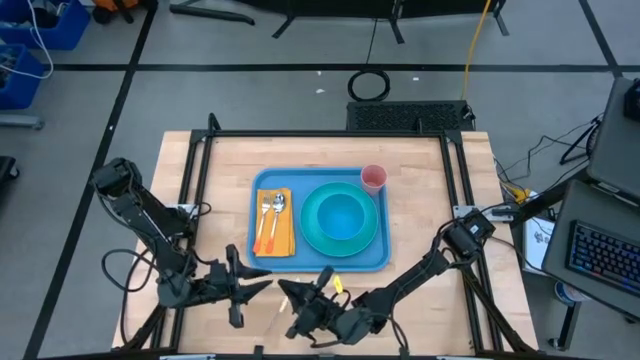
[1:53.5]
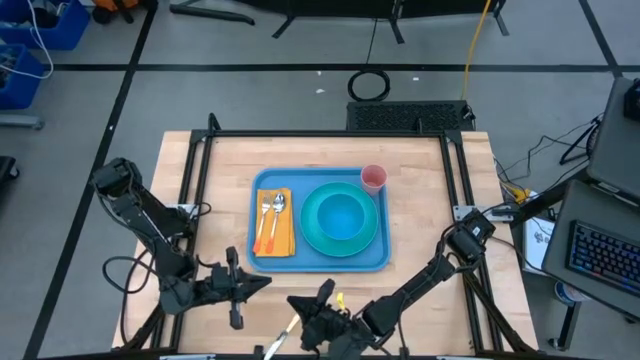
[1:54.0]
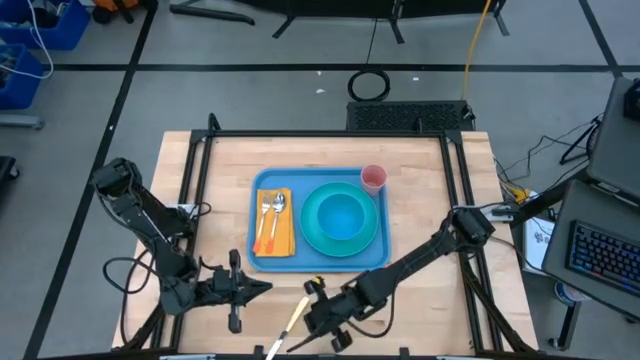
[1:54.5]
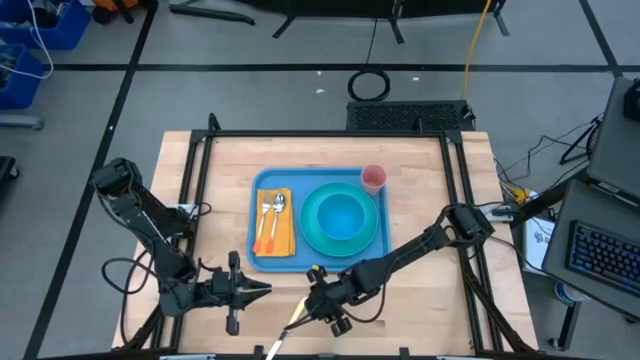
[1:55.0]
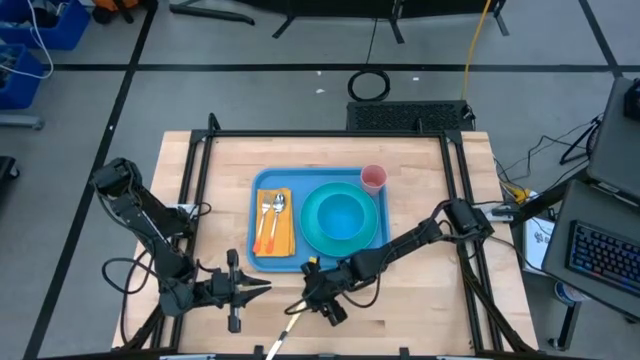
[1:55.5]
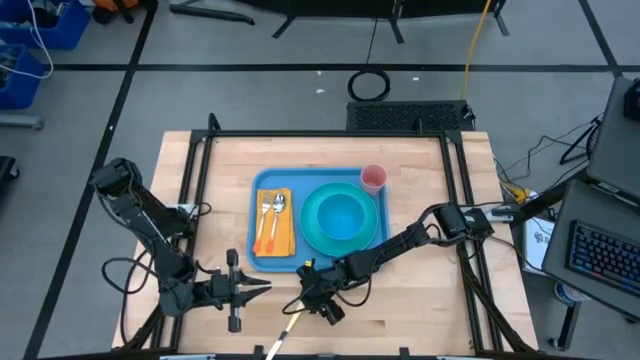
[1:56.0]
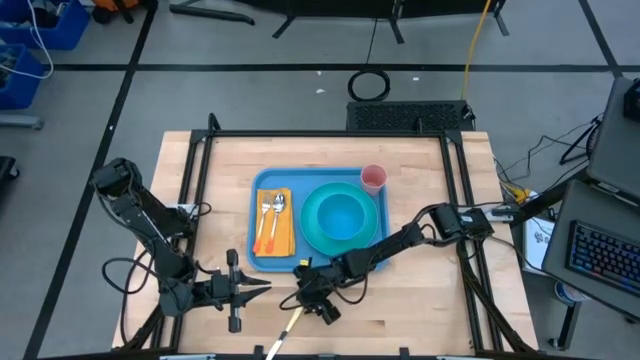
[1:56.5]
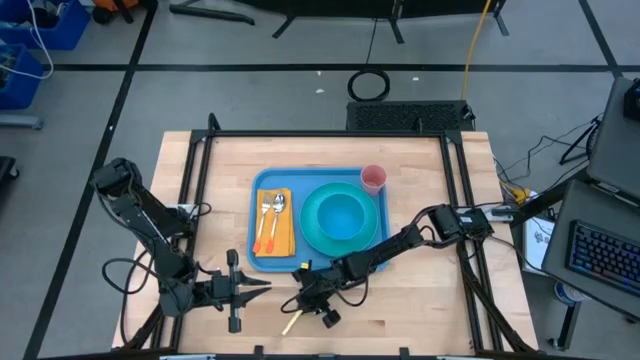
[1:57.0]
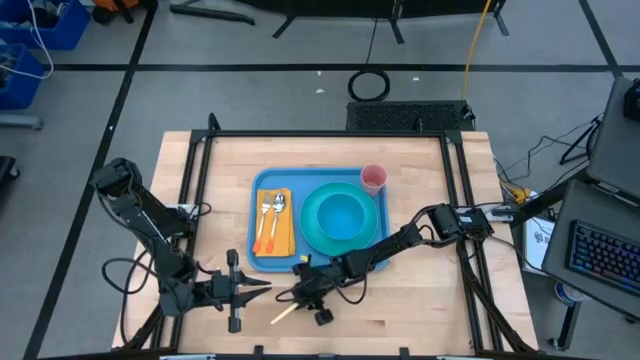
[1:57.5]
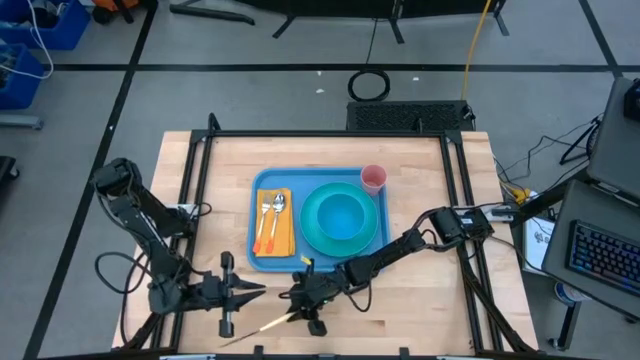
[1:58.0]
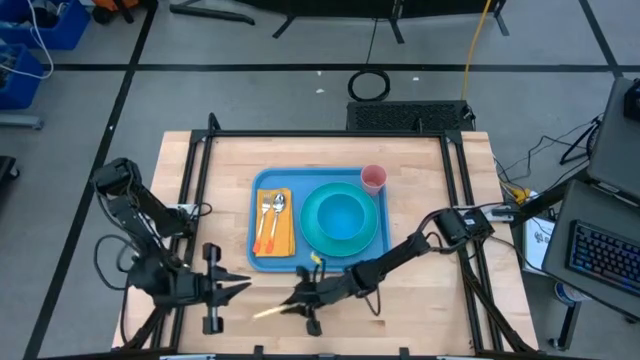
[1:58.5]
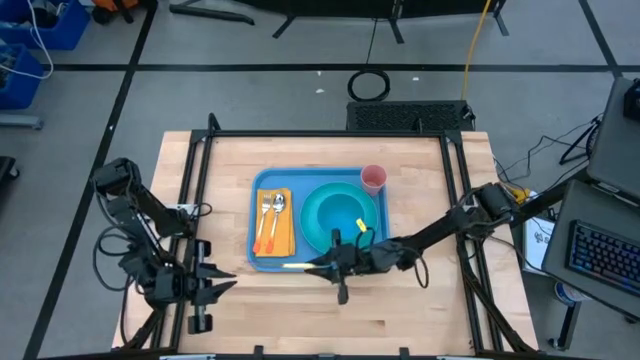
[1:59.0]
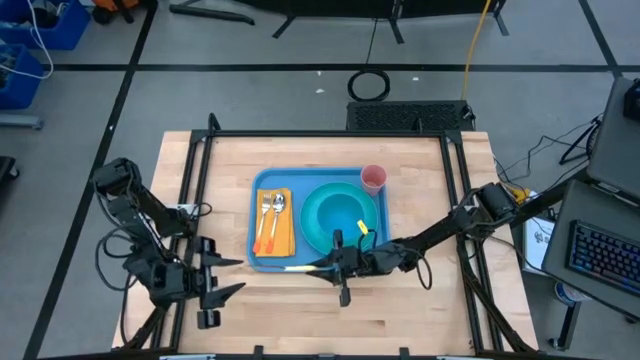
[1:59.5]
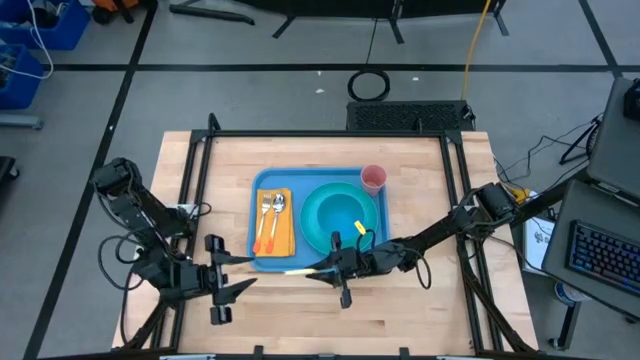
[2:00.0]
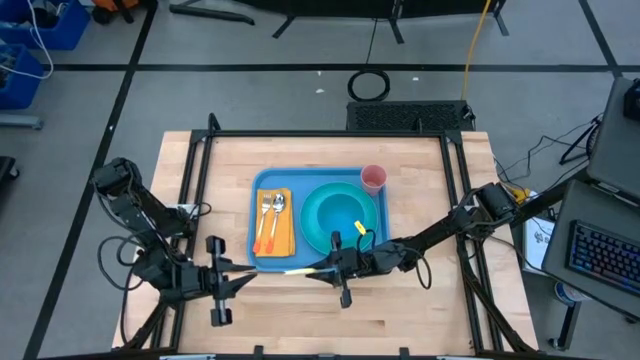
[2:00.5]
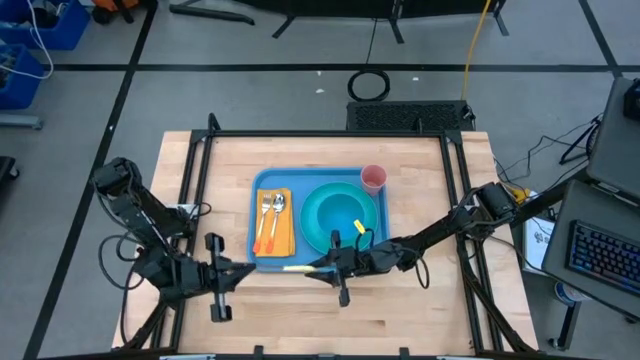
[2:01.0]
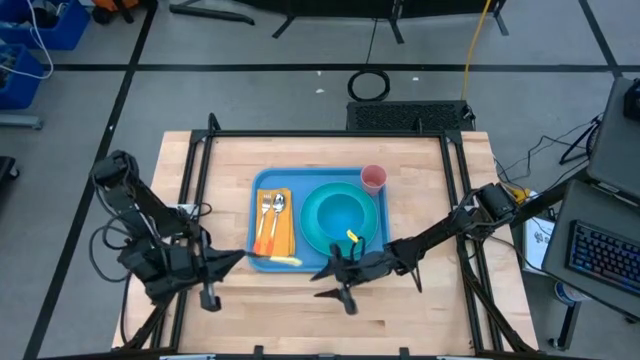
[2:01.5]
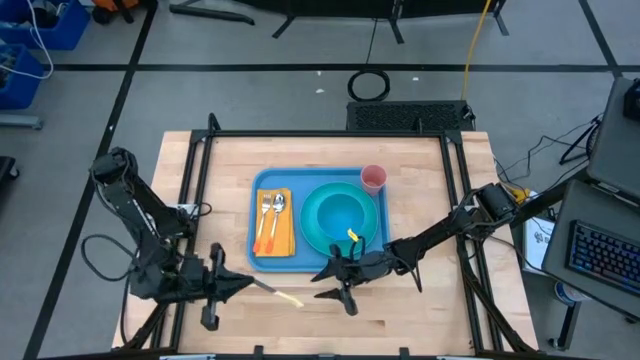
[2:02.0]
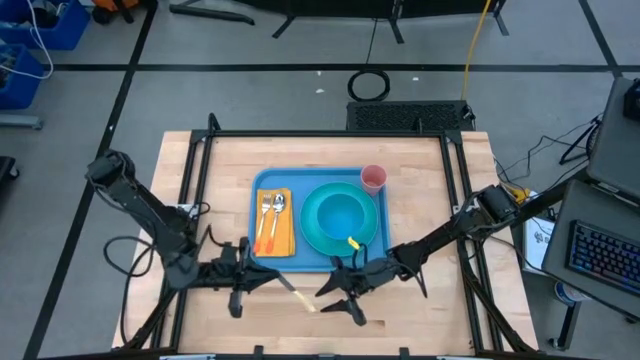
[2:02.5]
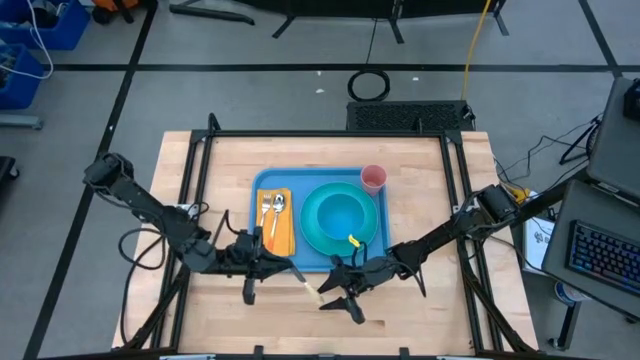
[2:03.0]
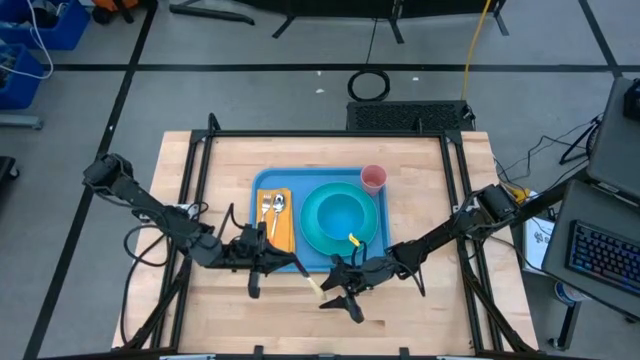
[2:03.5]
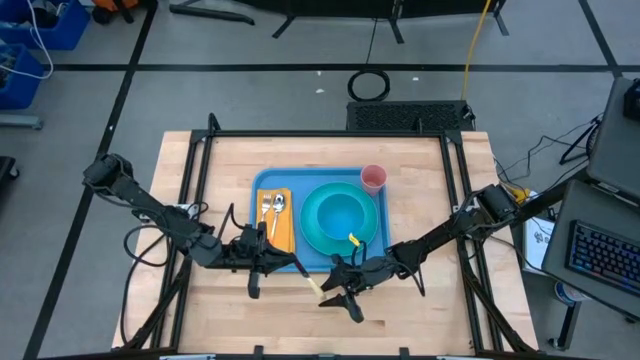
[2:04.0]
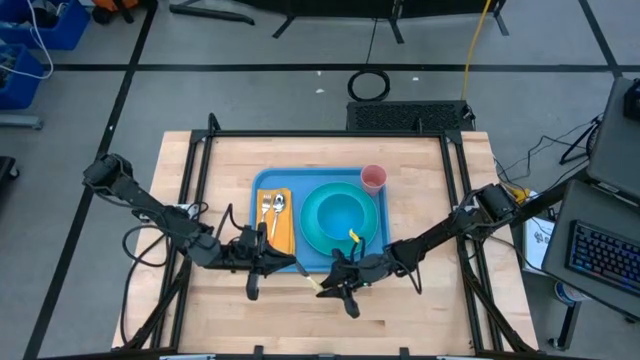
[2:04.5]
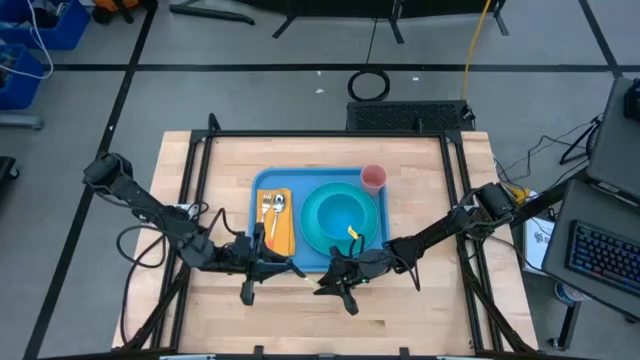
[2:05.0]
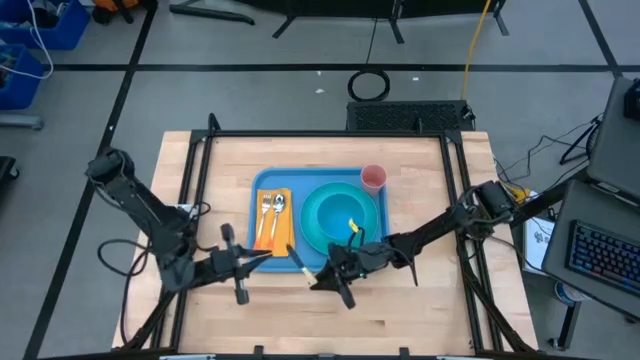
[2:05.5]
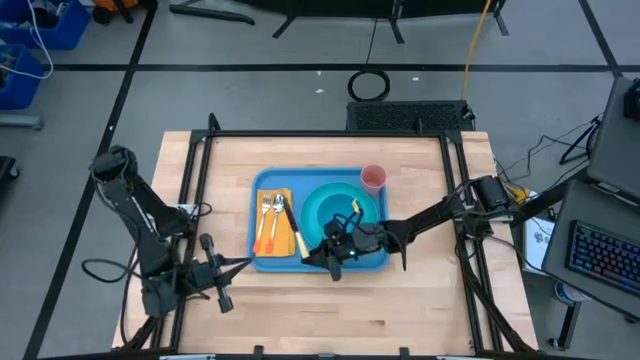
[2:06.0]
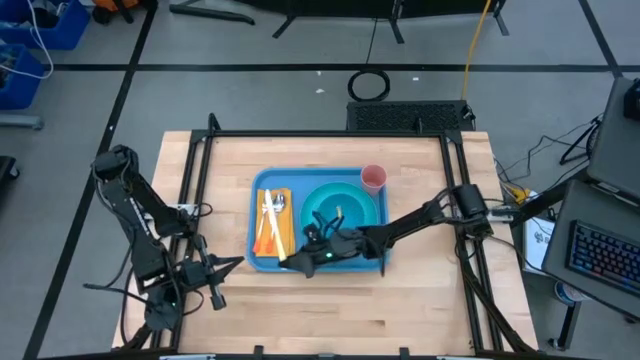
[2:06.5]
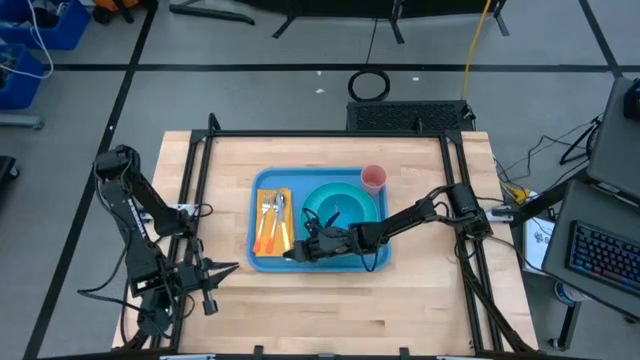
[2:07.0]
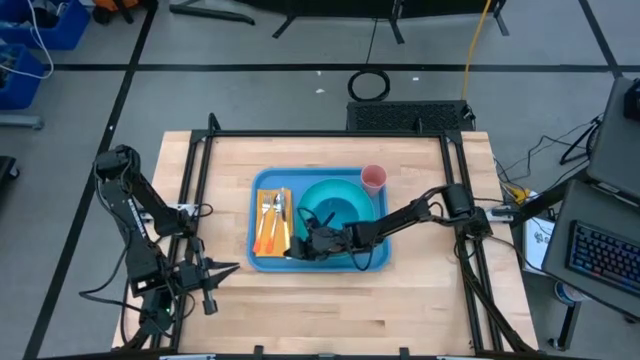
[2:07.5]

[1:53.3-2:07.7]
Task: Set up tray
Put the yellow knife on the yellow table napkin

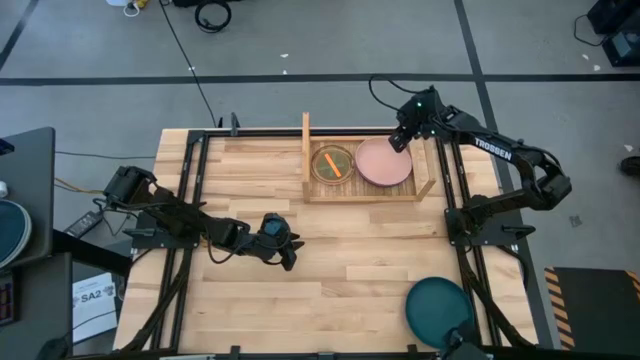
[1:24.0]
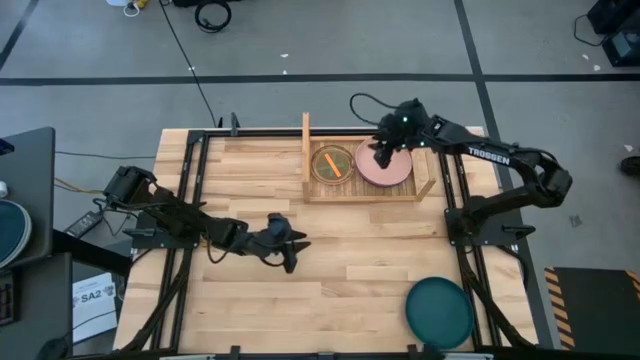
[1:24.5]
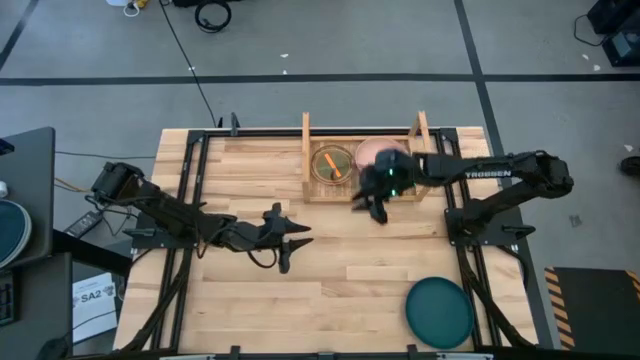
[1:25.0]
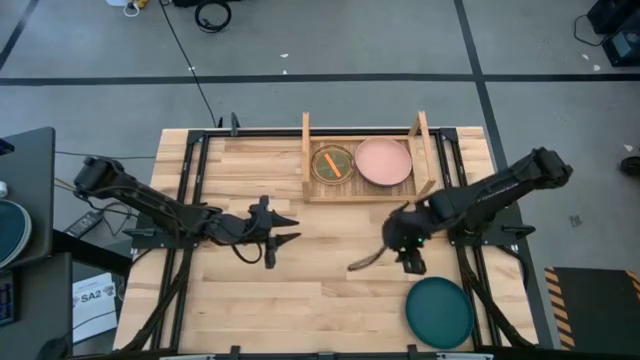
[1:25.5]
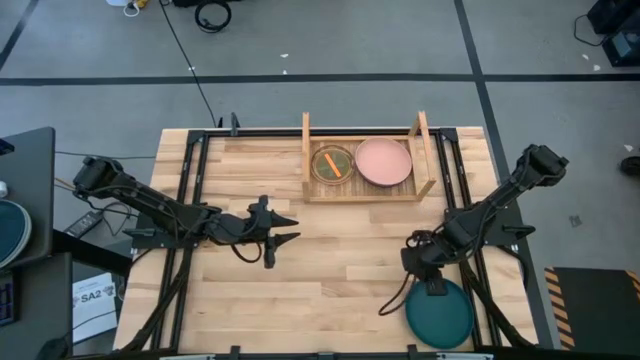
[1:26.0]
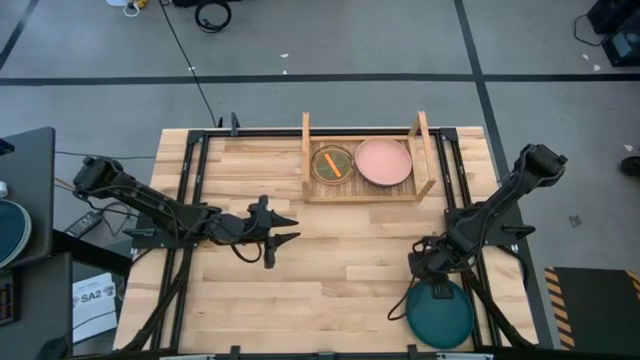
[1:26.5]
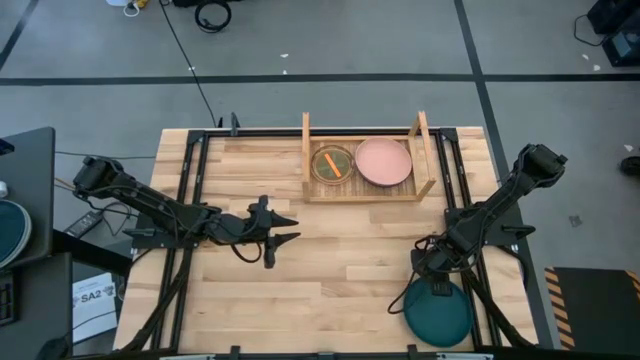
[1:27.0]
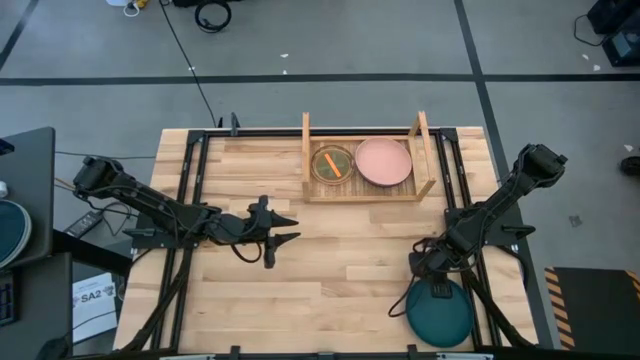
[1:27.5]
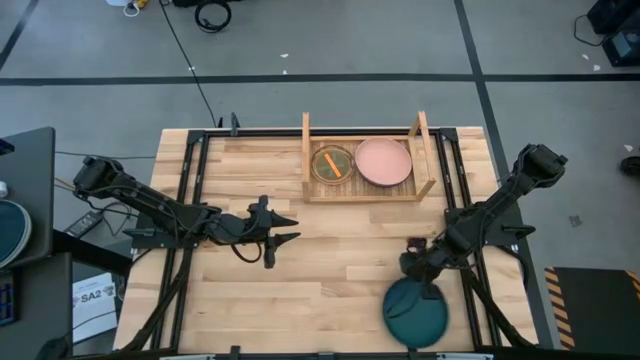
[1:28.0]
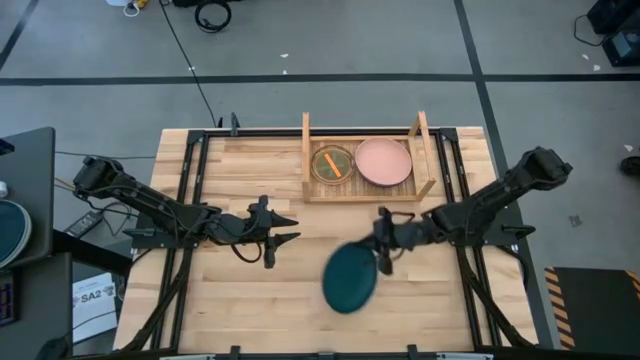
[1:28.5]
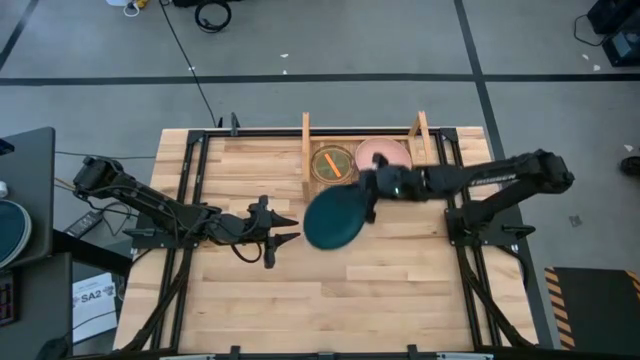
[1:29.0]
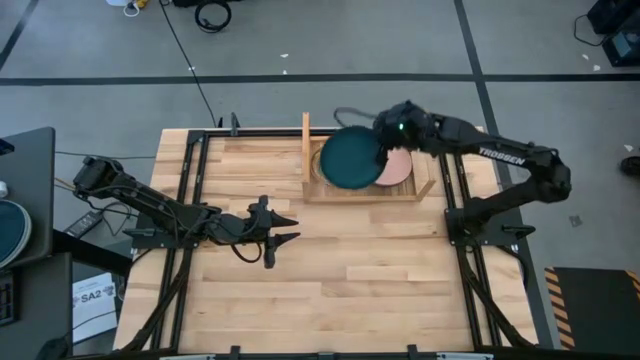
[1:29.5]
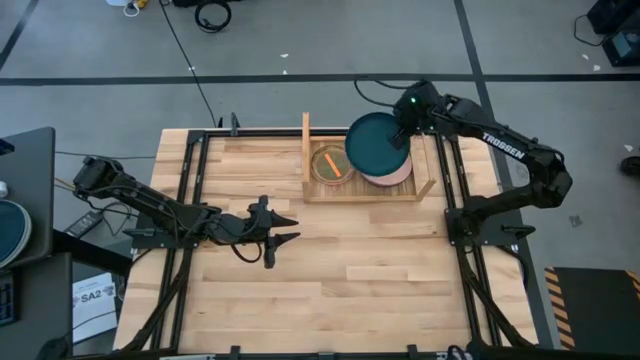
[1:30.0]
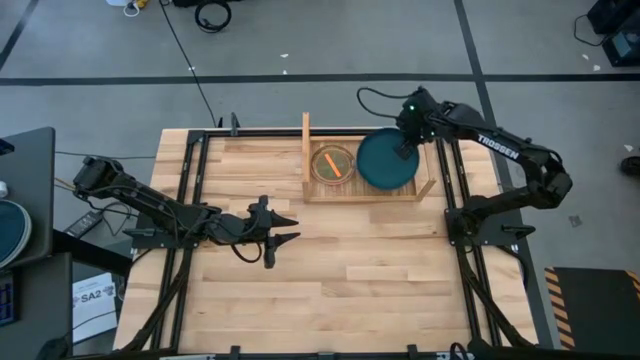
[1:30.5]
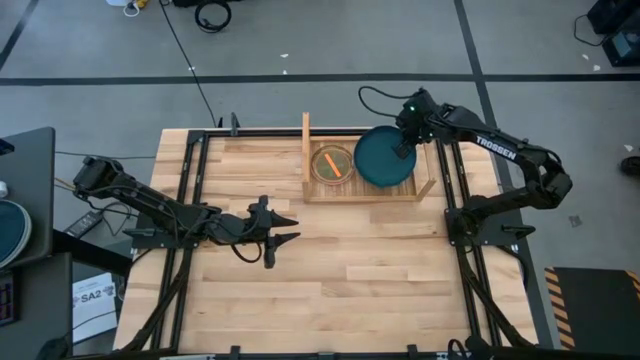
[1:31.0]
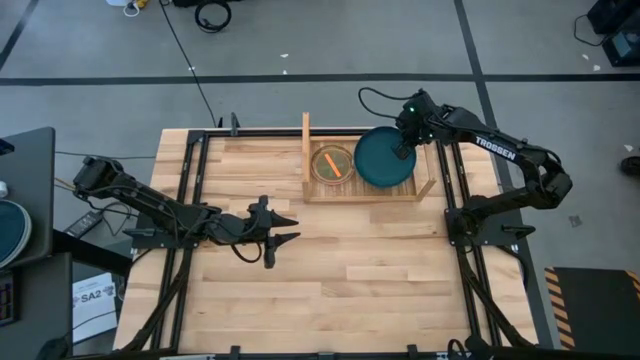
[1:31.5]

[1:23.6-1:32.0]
Task: Place and stack plates onto a shelf
Stack the large dark blue plate on top of the large purple plate on the shelf
